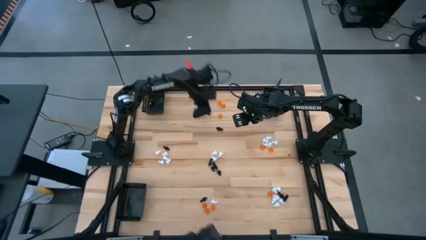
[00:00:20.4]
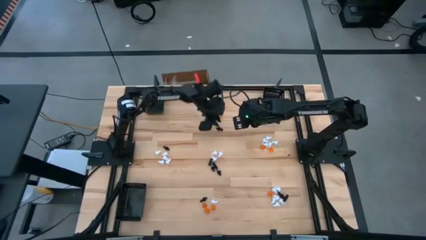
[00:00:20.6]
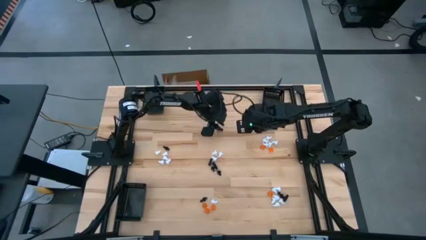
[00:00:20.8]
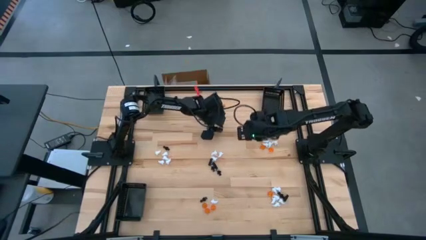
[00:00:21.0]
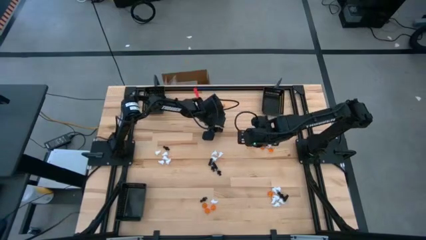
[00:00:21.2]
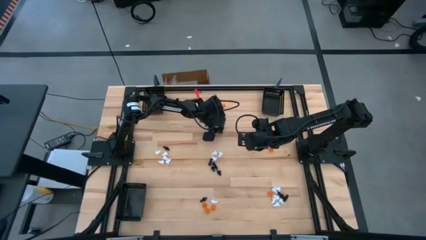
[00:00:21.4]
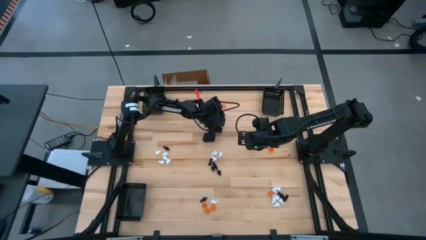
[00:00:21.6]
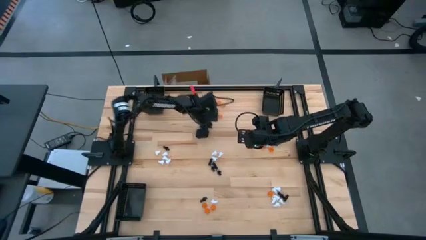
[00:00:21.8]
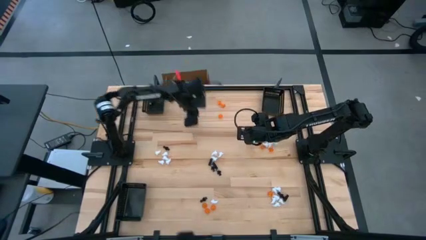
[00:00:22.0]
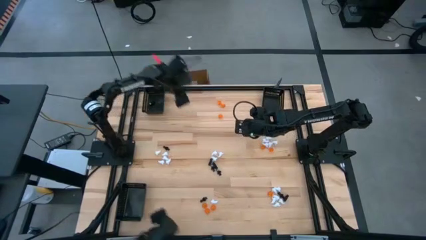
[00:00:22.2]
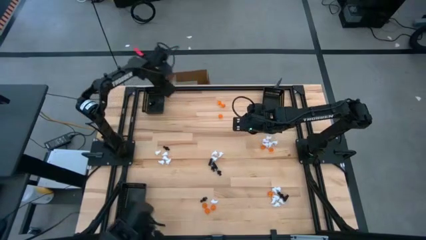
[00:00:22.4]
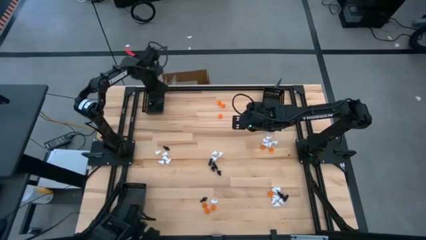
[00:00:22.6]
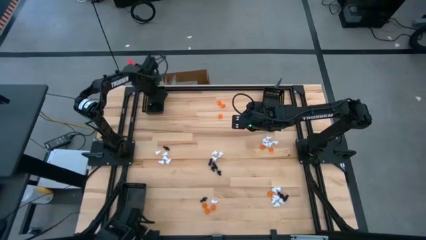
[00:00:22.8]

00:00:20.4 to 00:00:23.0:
Task: Sort Halloween decoration
Put the black skeleton toy into the top left black basket

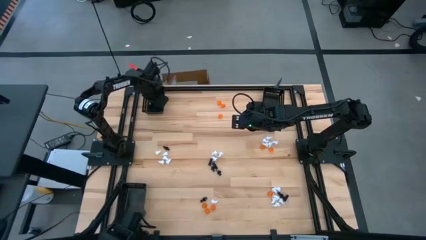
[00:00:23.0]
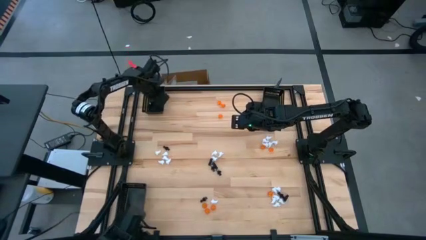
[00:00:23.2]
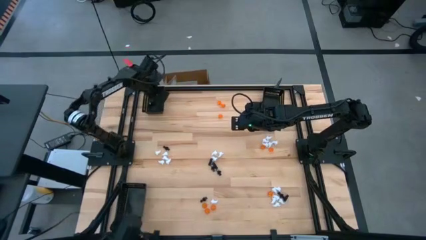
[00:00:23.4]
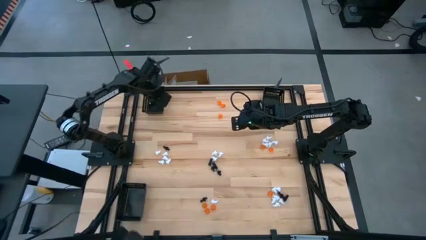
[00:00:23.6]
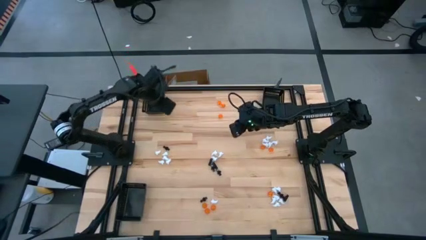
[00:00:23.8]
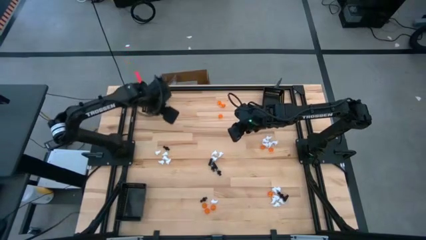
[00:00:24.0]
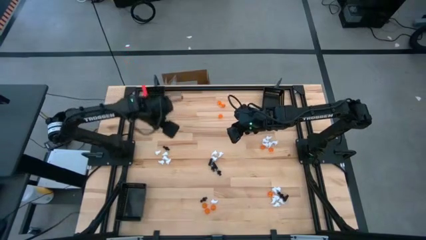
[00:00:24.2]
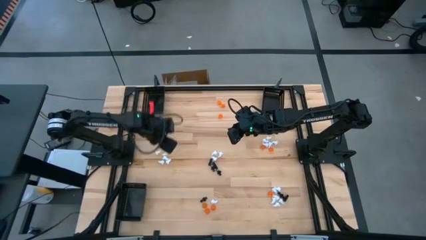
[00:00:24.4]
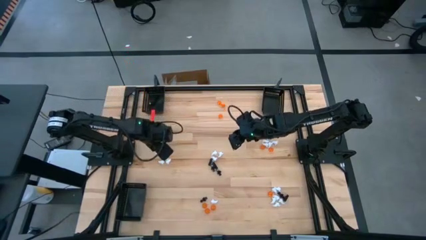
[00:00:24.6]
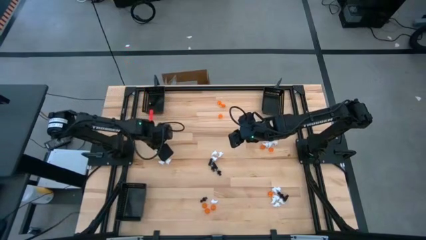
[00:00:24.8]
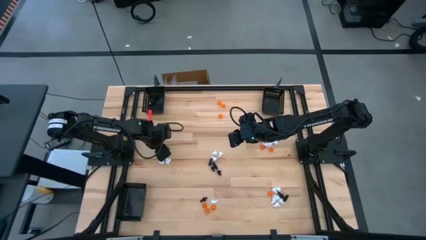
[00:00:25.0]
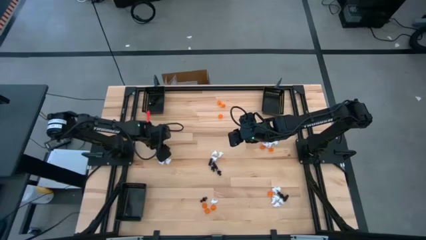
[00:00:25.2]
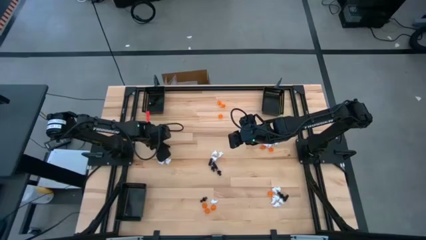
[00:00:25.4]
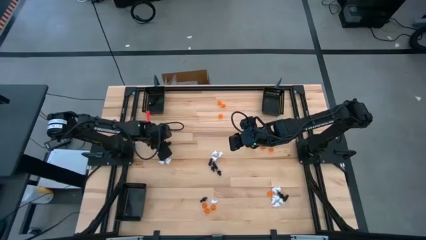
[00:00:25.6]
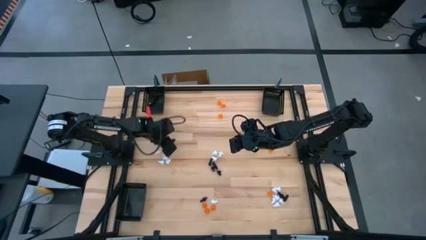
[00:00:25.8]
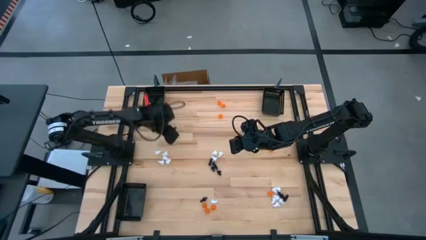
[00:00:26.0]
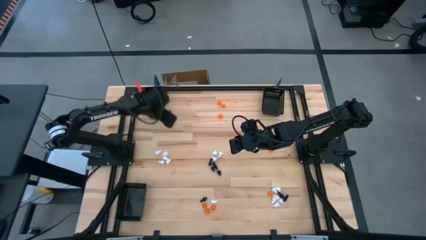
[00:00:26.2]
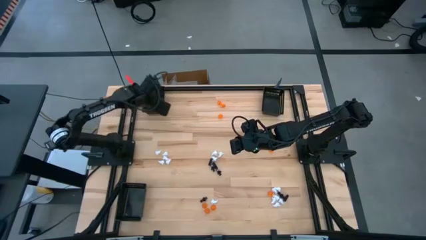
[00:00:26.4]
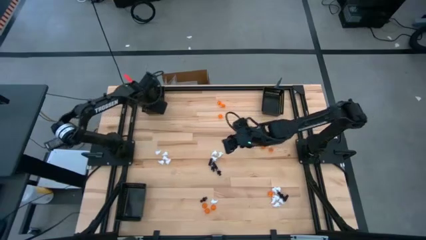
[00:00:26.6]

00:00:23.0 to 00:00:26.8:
Put the black skeleton toy into the top left black basket

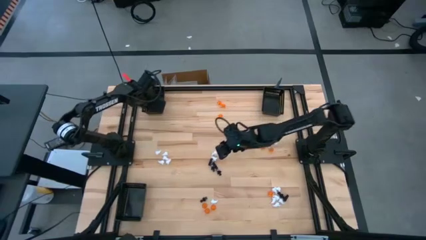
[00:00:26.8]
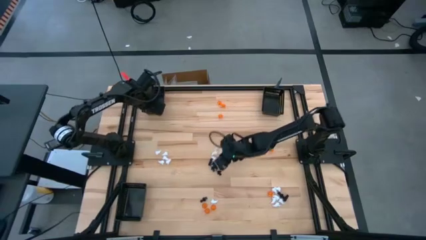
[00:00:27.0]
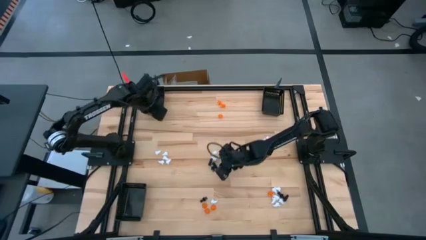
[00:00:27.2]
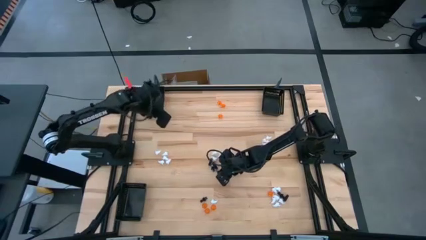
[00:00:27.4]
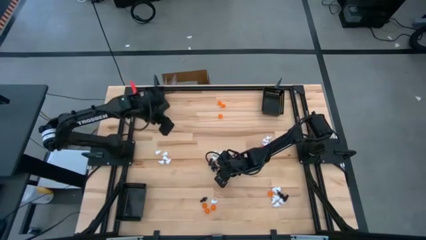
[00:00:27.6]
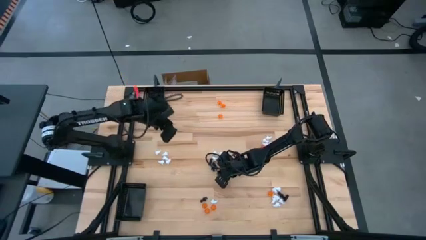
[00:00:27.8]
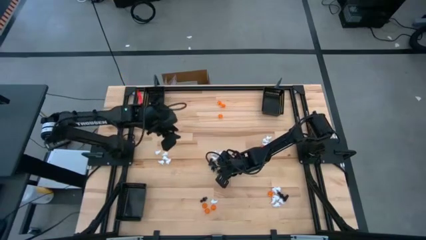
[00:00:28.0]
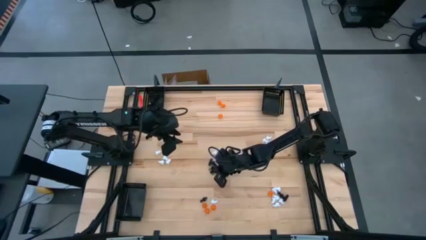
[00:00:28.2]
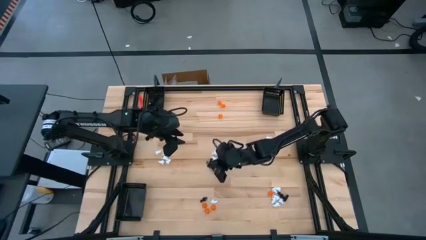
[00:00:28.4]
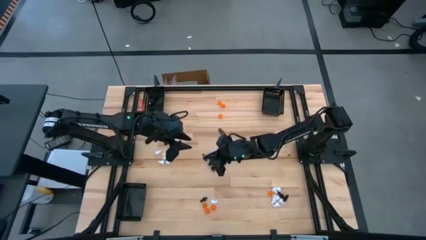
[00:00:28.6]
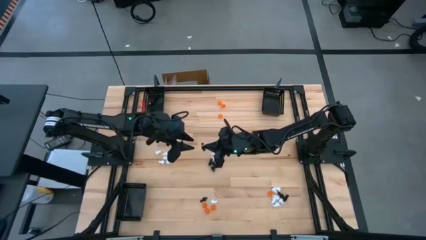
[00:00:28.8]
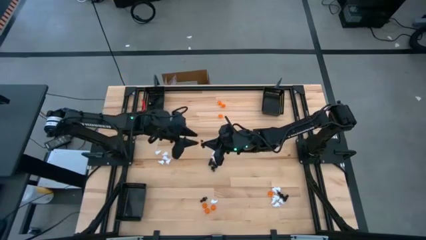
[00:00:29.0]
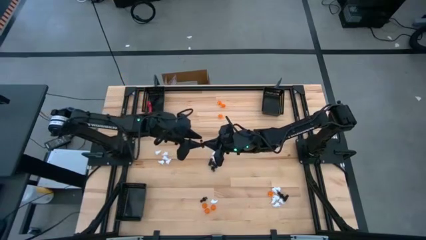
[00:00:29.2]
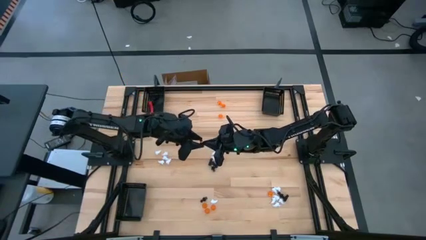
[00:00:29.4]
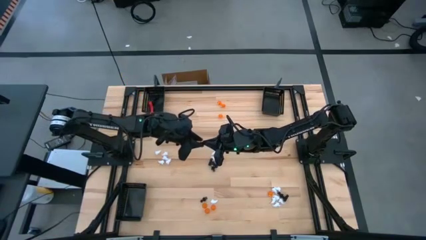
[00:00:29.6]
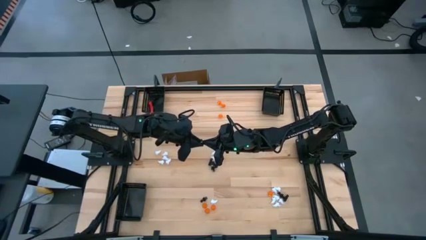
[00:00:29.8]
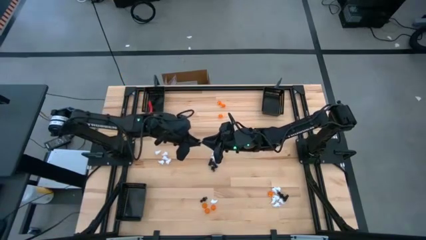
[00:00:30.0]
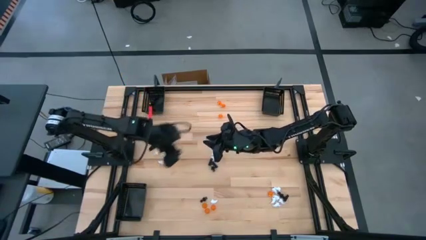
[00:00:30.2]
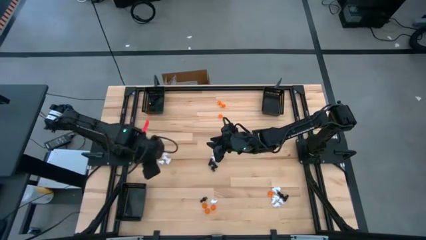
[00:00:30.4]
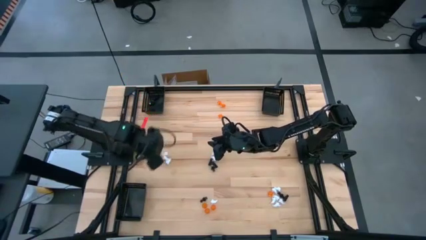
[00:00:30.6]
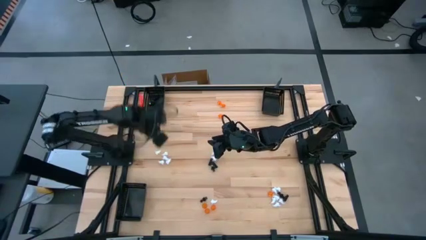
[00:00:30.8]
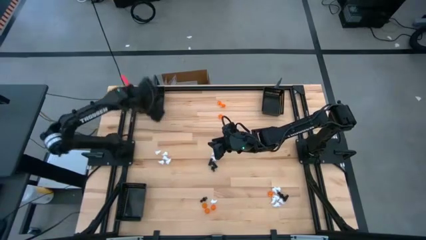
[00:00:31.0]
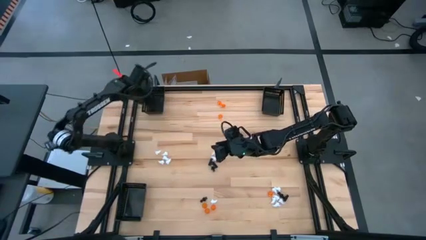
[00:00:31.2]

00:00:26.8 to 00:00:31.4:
Put the black skeleton toy into the top left black basket

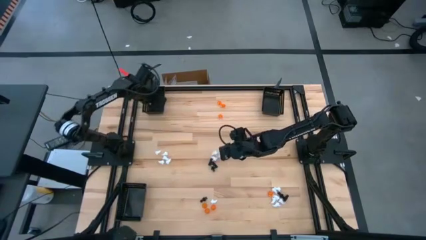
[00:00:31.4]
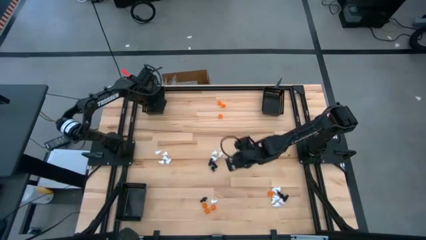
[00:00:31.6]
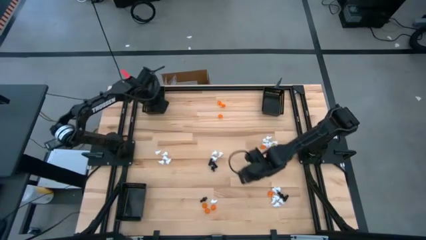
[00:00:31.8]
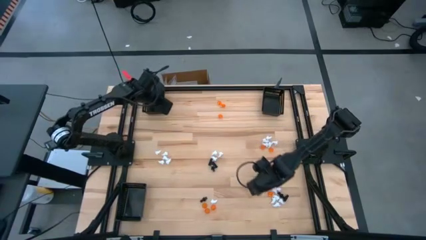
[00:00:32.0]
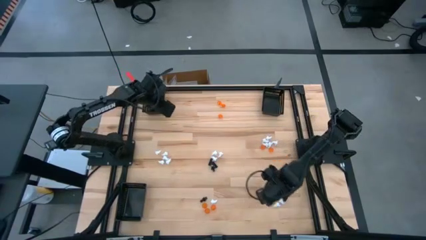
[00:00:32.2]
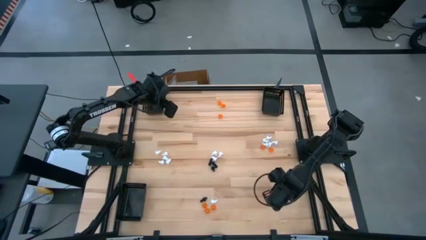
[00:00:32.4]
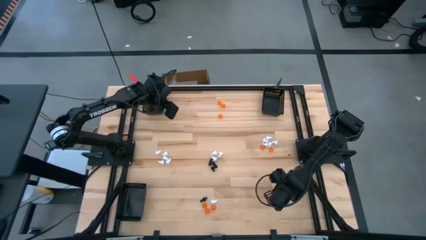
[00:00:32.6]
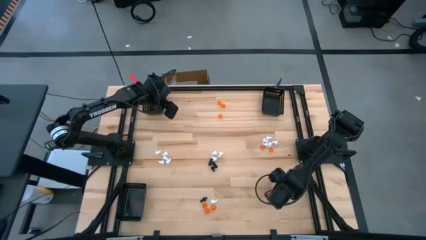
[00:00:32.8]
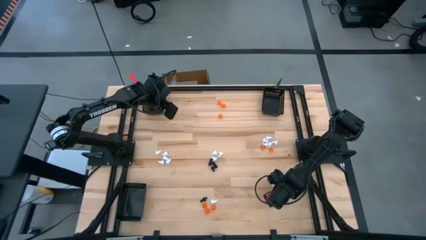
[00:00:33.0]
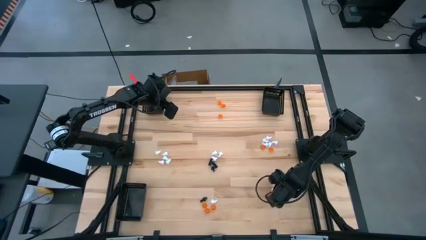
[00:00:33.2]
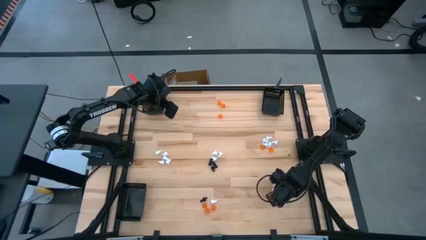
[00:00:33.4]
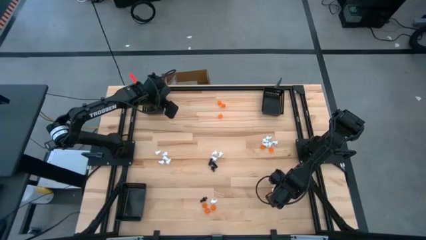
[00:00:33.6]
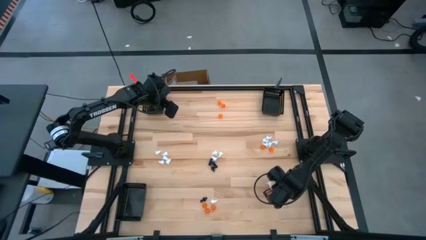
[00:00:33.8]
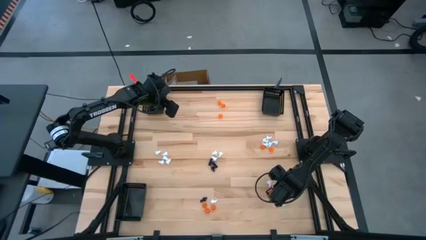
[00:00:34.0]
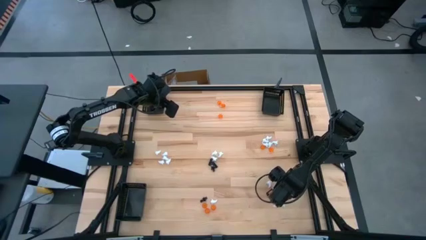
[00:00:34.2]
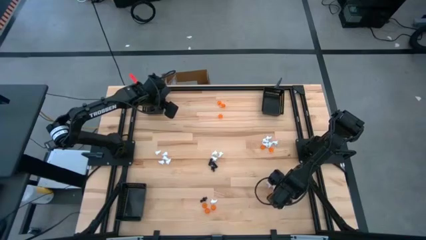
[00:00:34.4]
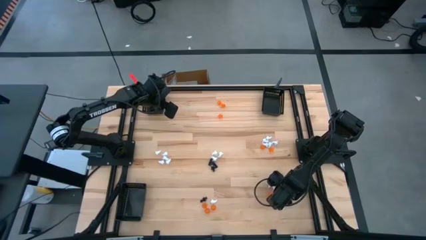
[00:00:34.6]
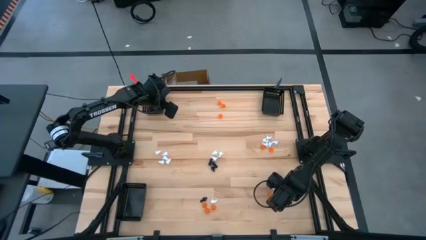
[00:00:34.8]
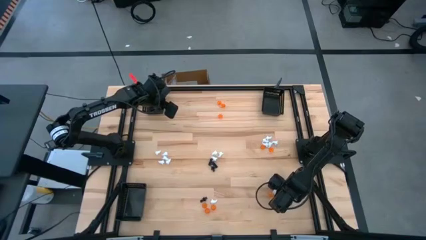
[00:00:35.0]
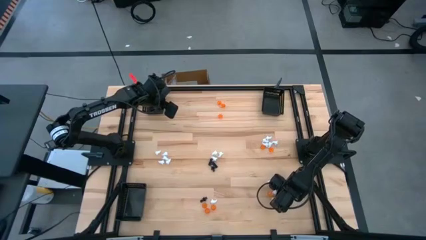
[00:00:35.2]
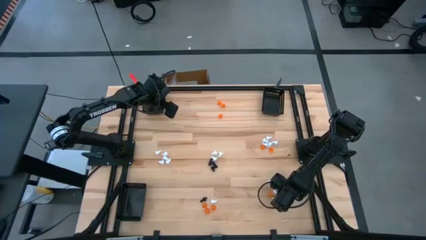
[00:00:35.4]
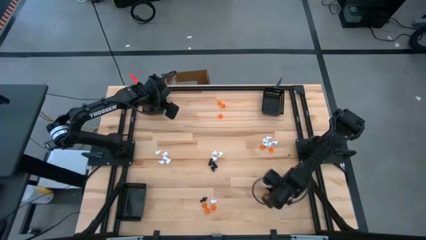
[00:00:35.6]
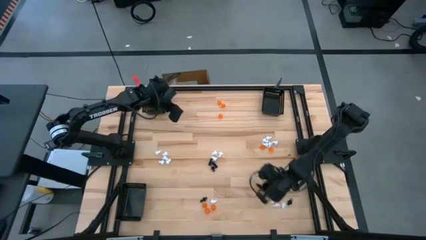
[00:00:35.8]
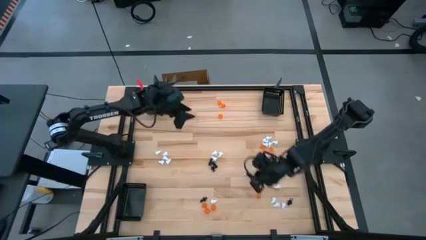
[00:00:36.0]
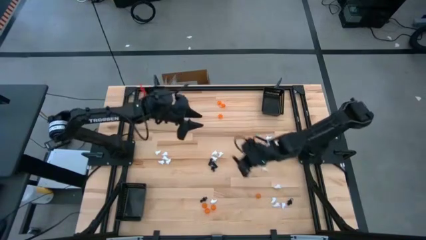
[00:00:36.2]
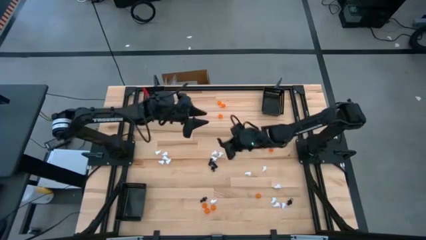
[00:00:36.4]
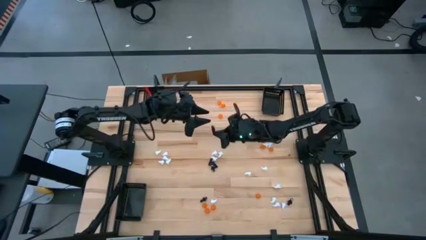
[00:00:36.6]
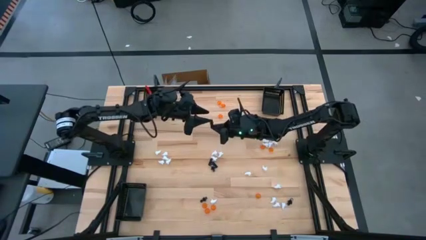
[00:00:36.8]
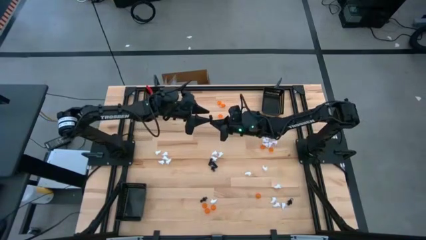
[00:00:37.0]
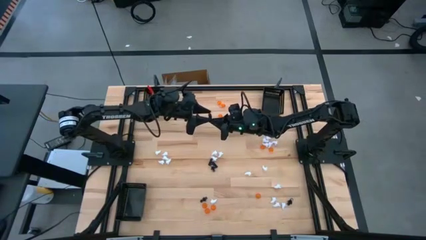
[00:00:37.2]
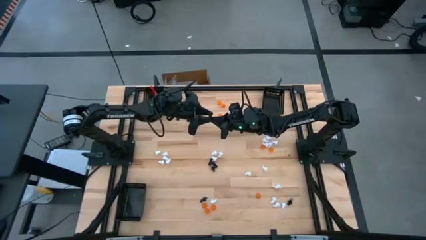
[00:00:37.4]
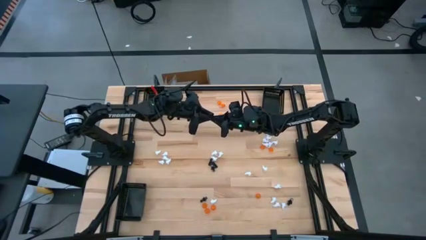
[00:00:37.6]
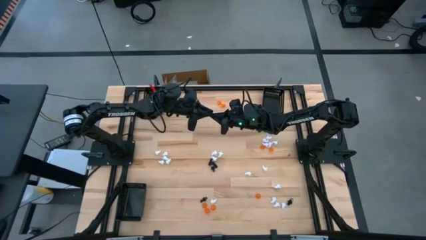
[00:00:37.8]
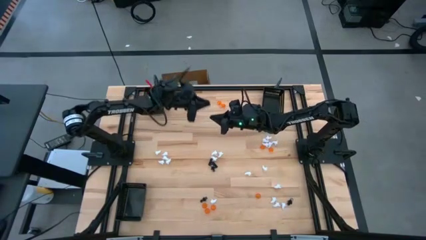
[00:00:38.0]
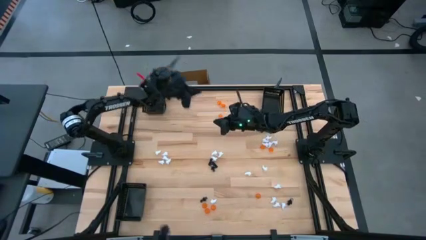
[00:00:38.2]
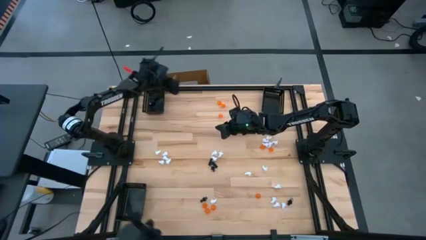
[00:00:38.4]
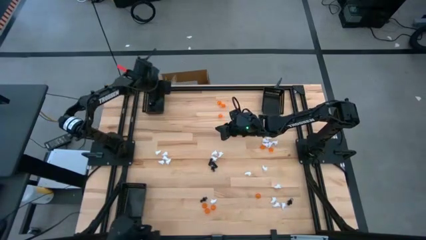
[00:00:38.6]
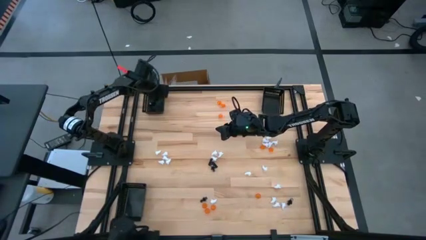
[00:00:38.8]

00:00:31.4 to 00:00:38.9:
Put the black skeleton toy into the top left black basket
